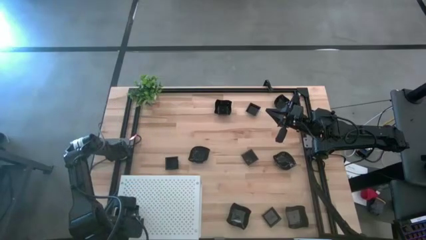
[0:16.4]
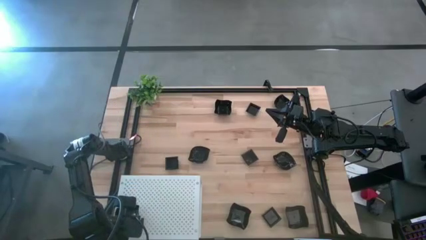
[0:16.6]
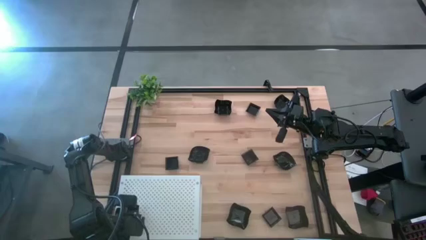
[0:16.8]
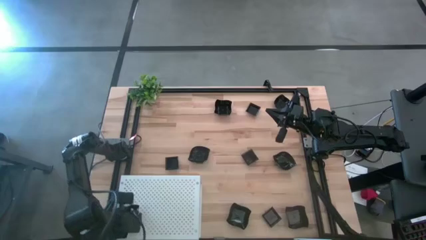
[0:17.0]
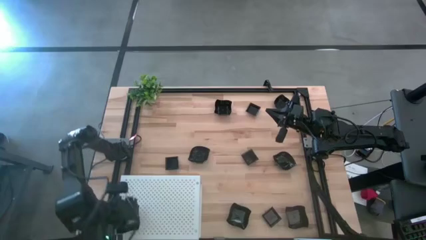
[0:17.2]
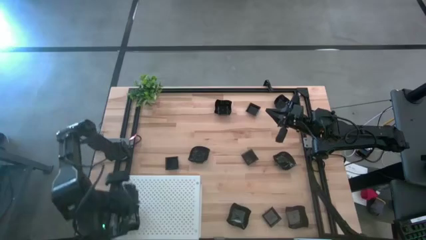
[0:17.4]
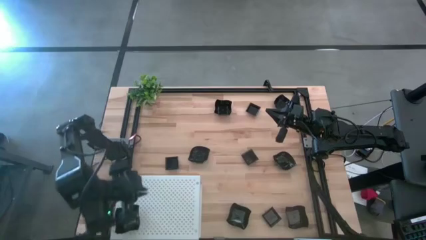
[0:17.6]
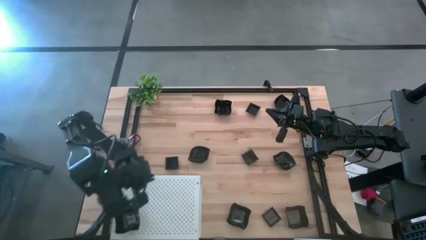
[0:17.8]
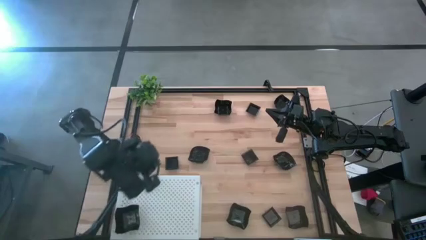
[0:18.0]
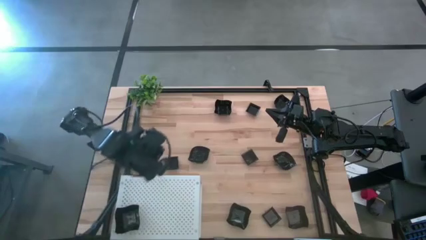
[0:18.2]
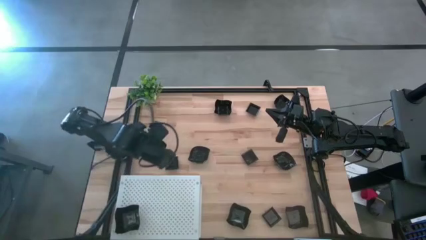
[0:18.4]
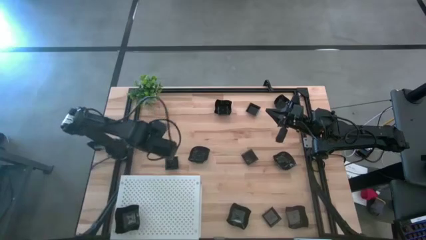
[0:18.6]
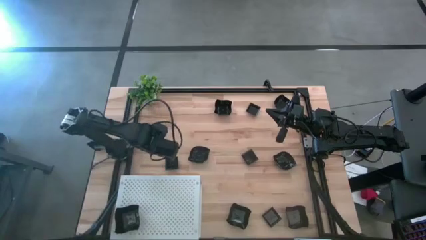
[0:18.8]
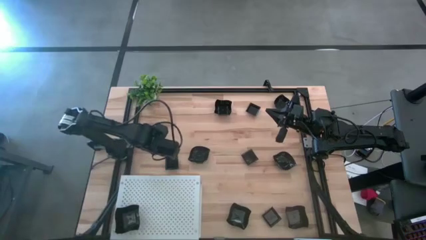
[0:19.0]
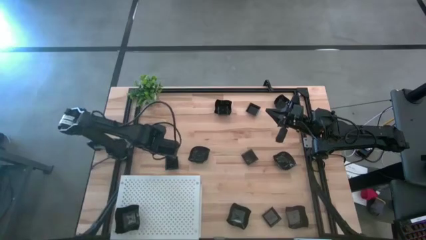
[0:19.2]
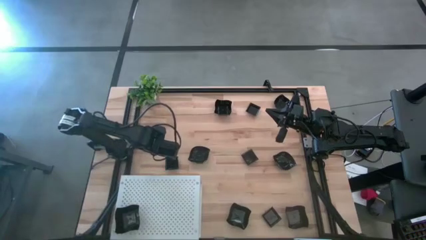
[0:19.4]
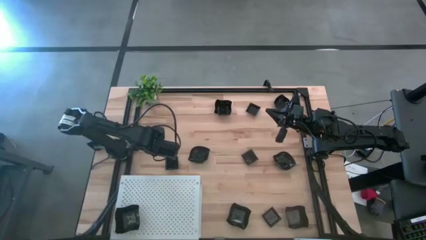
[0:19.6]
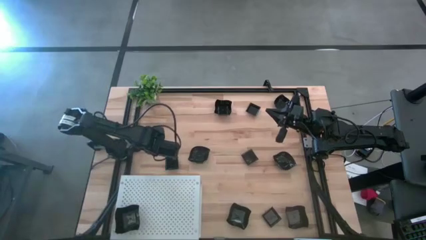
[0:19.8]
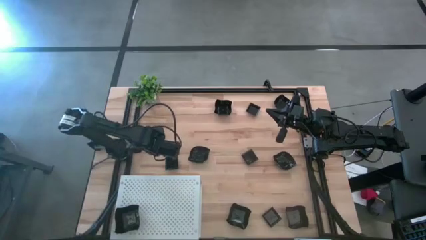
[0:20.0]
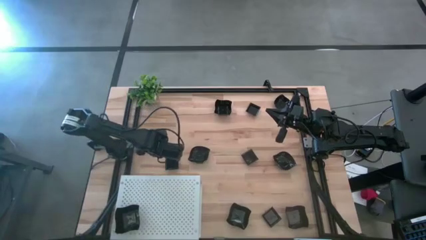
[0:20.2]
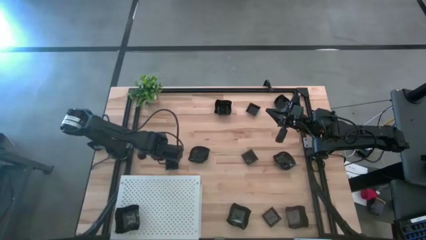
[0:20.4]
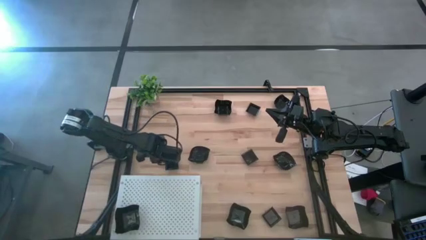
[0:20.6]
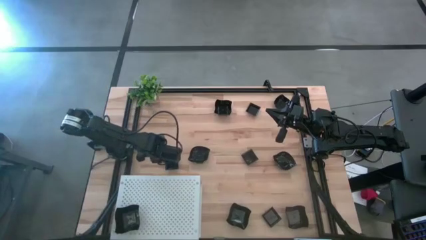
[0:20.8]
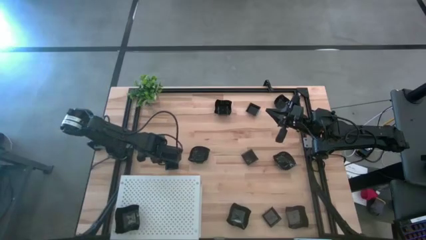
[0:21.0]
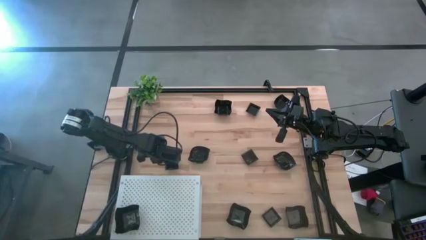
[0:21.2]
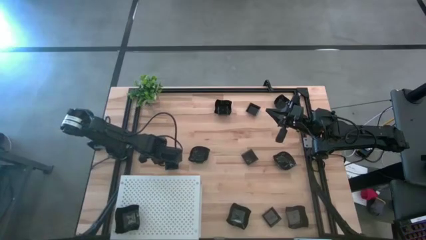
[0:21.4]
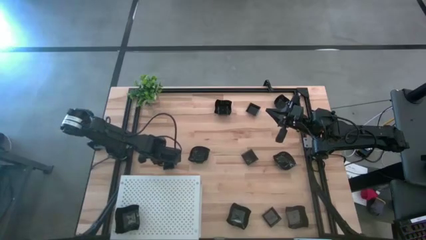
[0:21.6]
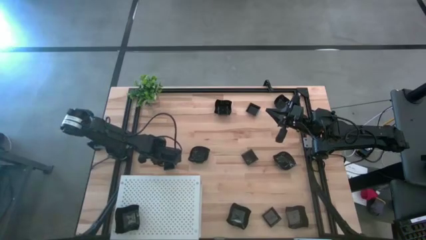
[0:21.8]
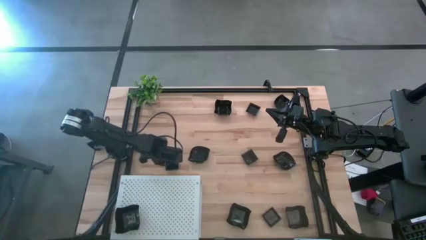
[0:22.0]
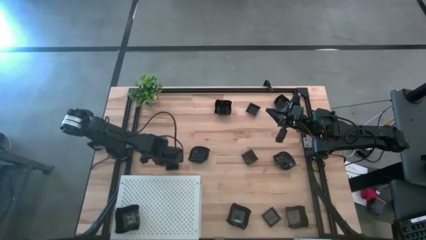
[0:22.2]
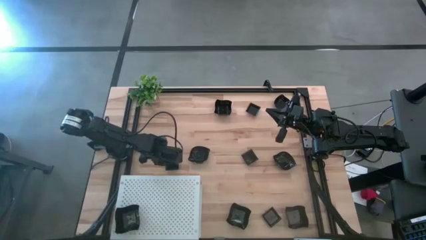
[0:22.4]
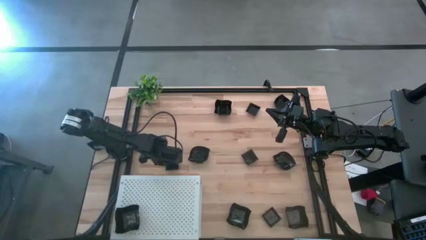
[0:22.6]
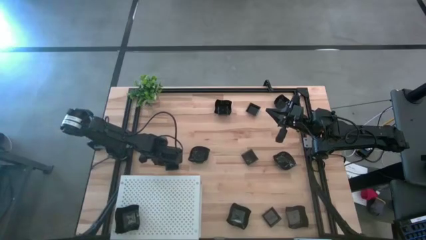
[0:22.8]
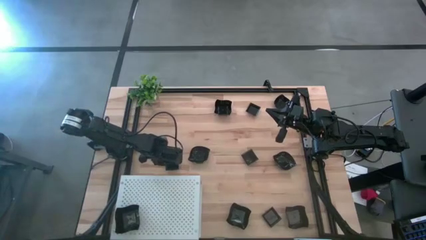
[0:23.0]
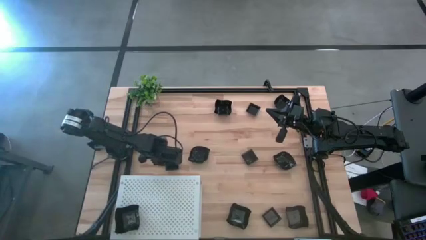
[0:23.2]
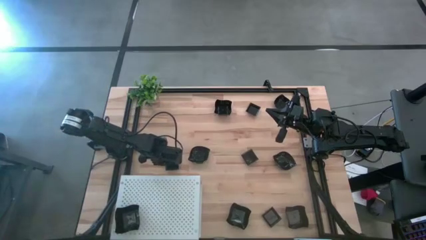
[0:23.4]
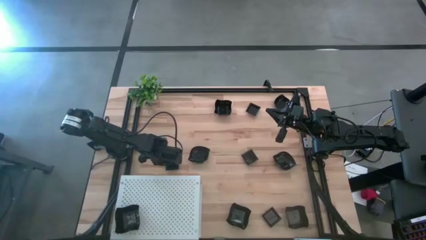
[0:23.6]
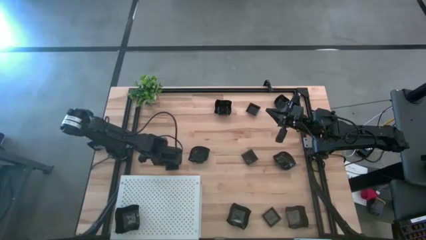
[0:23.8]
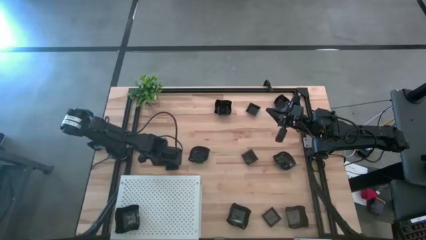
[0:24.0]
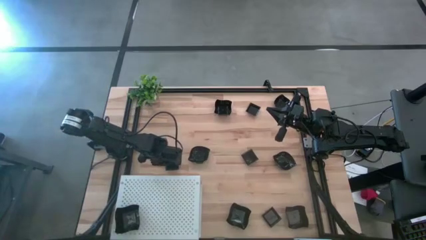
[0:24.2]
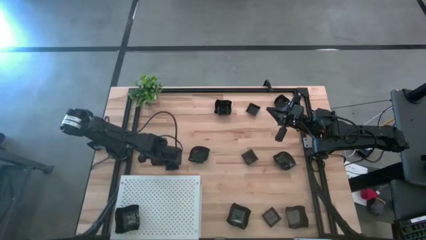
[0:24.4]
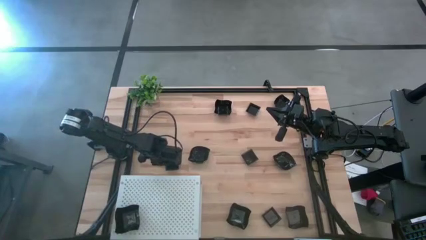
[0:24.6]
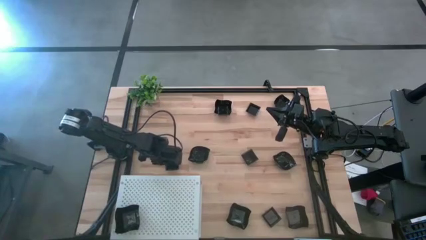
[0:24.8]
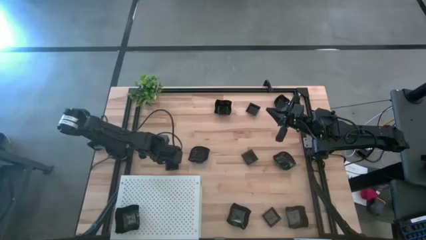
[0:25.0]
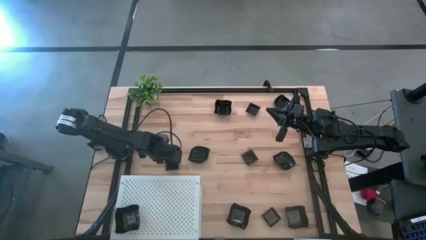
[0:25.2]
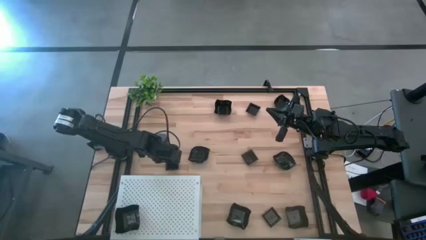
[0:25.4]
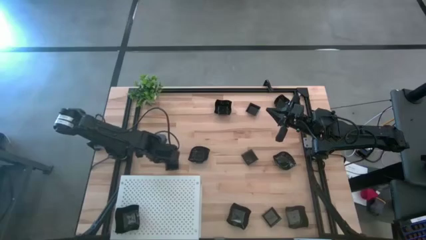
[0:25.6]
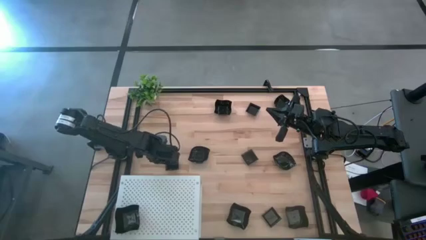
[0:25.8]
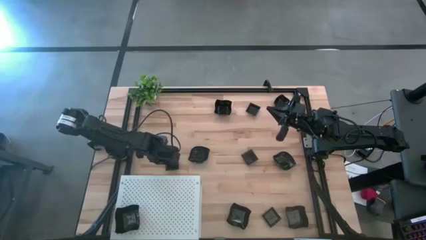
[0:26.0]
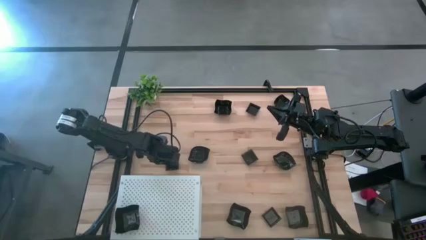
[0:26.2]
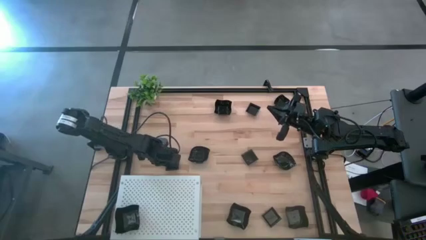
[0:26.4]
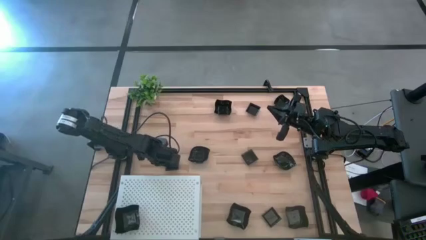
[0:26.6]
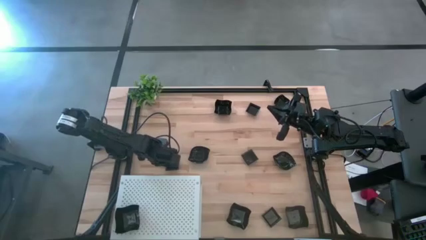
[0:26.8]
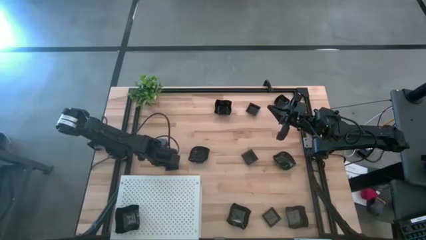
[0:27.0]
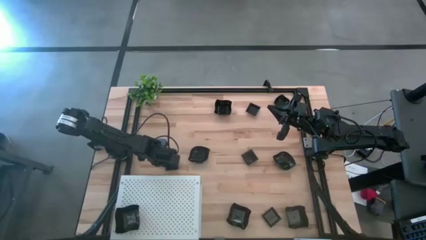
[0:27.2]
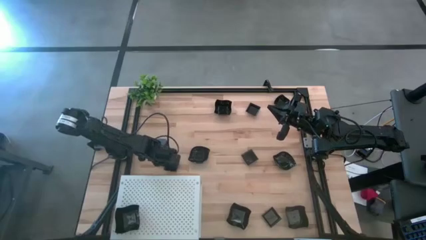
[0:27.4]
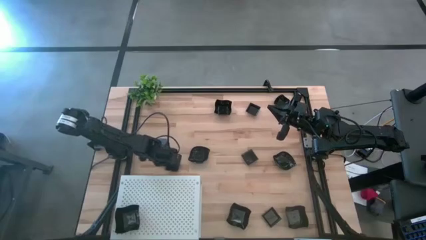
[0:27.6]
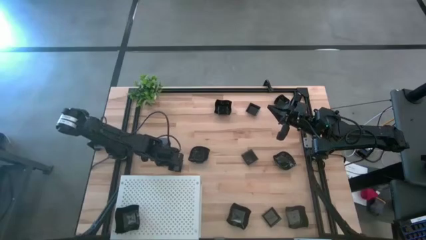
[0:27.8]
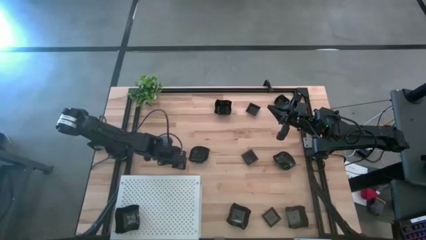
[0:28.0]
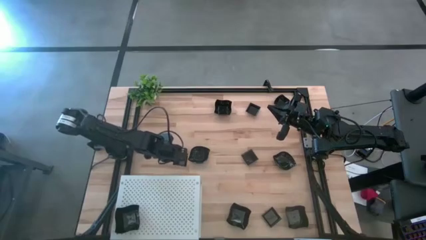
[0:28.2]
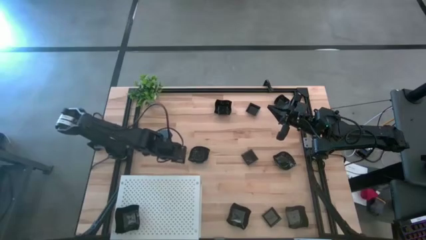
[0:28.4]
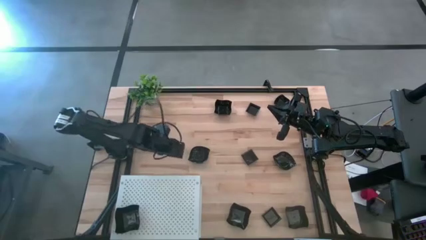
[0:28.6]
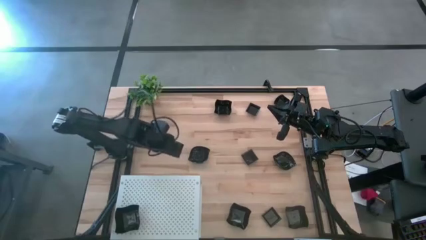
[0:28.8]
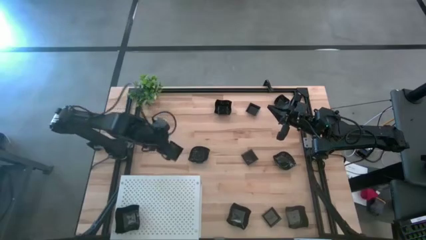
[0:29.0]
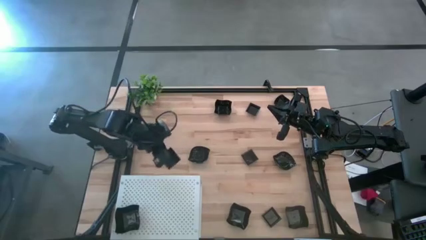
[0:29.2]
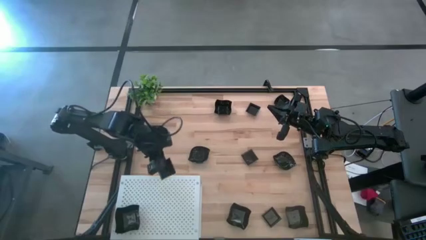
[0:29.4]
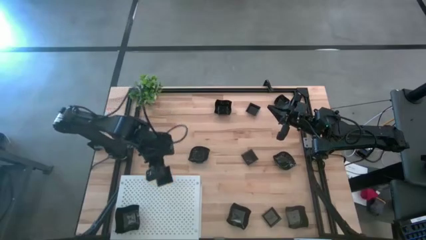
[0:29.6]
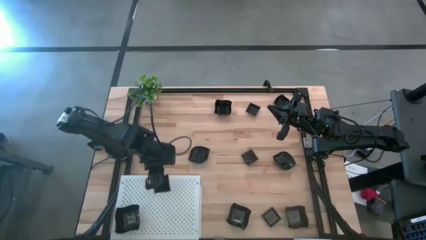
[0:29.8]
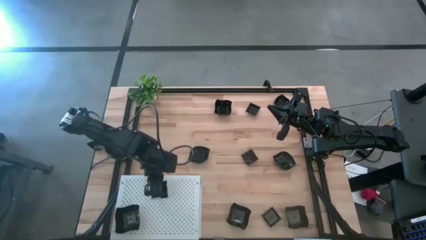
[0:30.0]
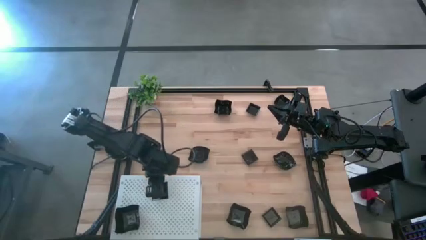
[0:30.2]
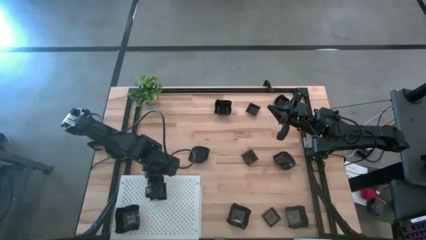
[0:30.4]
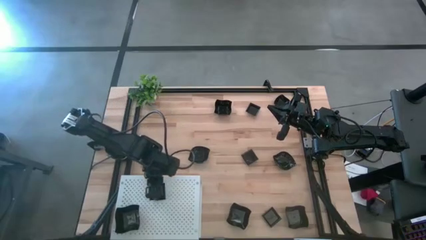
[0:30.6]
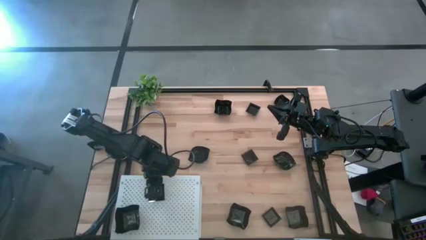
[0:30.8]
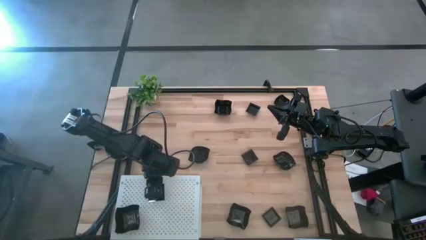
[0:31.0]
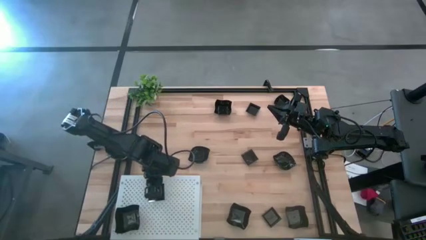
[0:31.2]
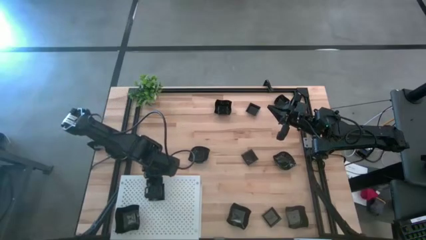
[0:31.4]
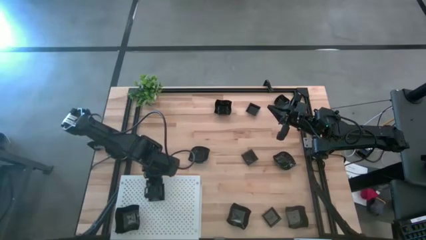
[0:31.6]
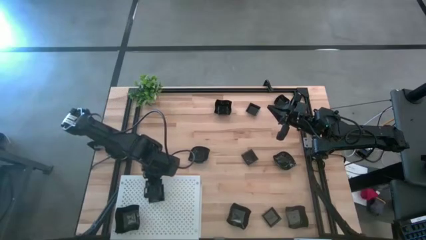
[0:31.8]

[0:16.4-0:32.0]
Task: Pick & Place Mini shaped plates
Put the square plate on the shelf
